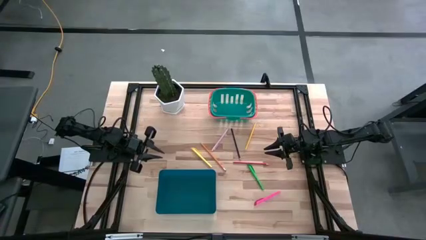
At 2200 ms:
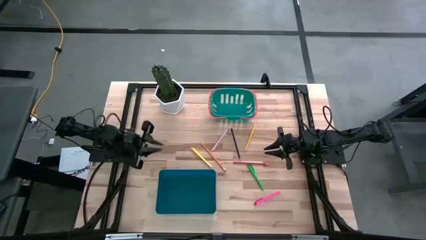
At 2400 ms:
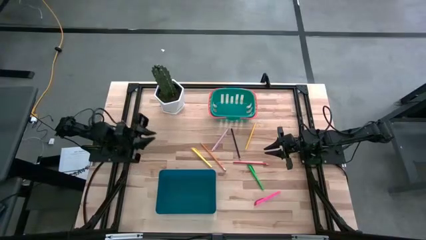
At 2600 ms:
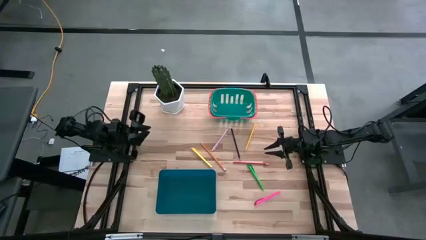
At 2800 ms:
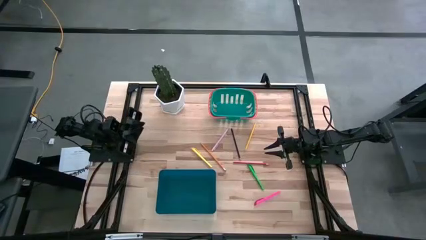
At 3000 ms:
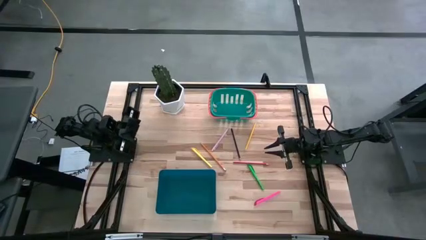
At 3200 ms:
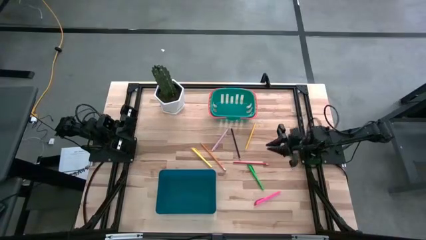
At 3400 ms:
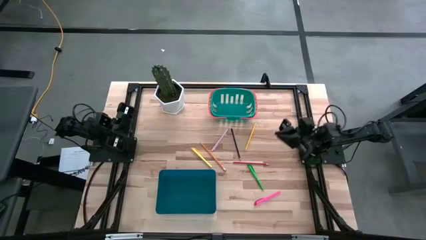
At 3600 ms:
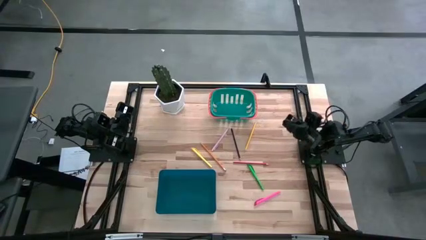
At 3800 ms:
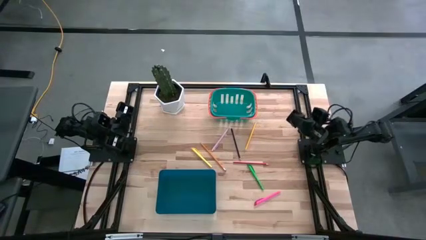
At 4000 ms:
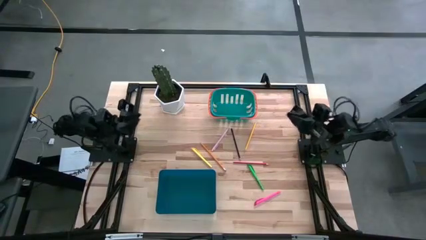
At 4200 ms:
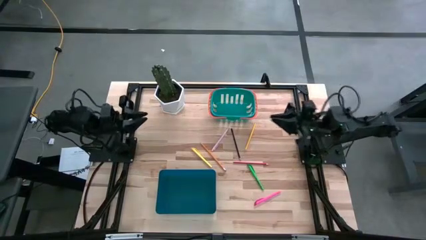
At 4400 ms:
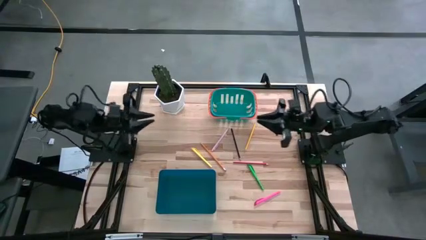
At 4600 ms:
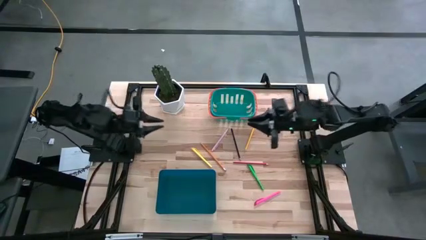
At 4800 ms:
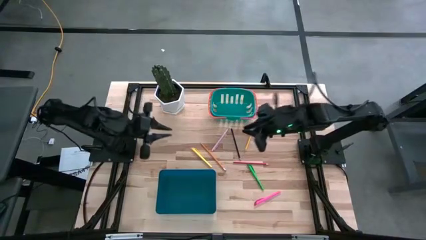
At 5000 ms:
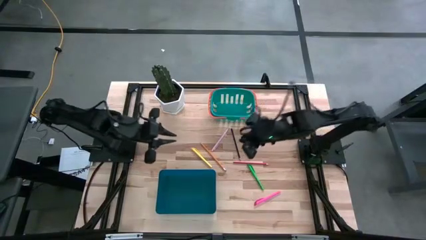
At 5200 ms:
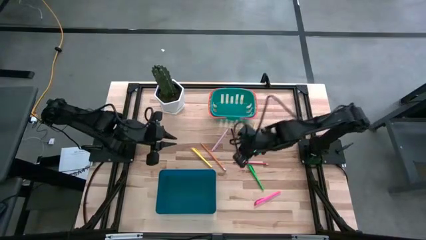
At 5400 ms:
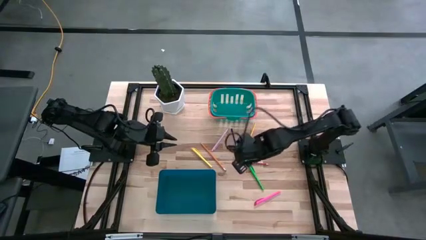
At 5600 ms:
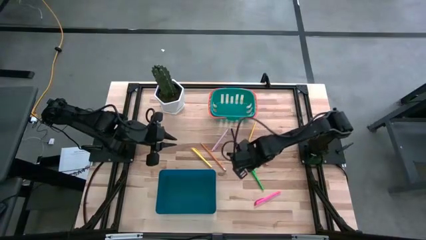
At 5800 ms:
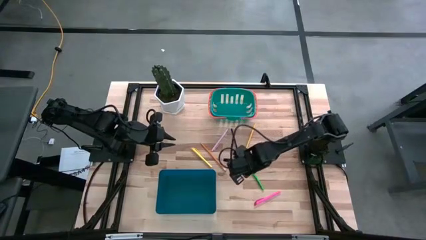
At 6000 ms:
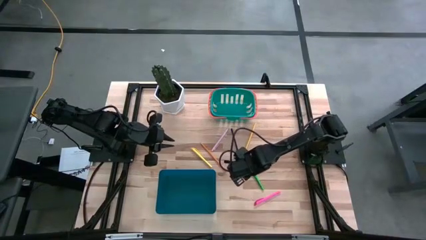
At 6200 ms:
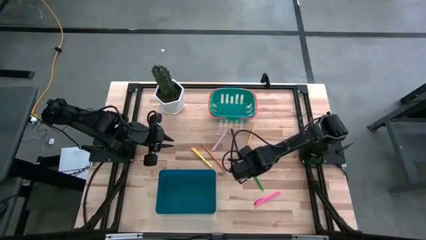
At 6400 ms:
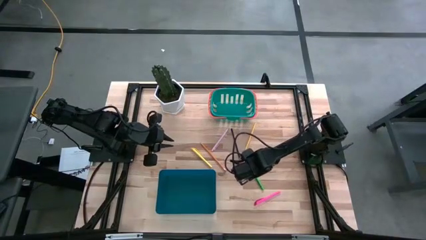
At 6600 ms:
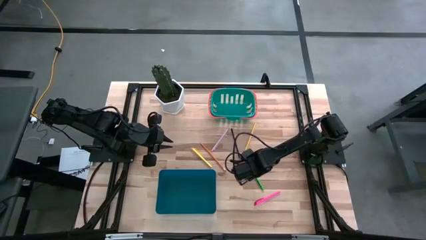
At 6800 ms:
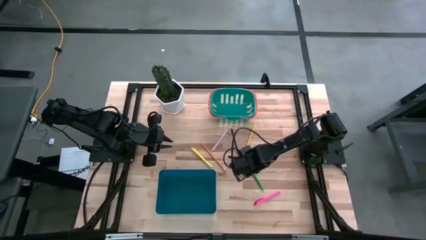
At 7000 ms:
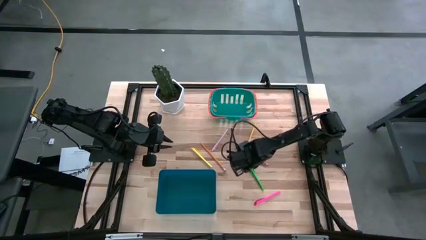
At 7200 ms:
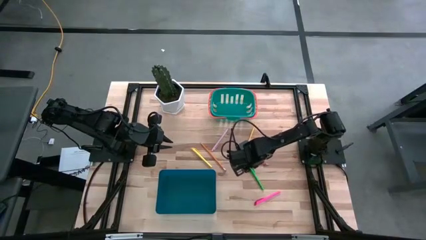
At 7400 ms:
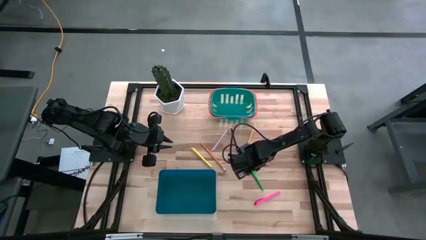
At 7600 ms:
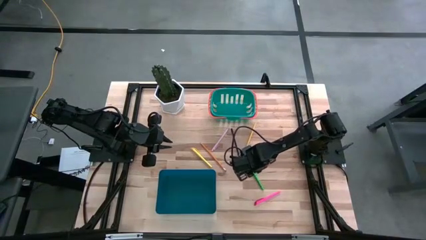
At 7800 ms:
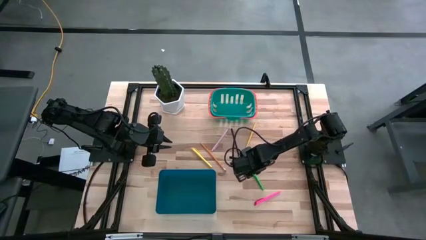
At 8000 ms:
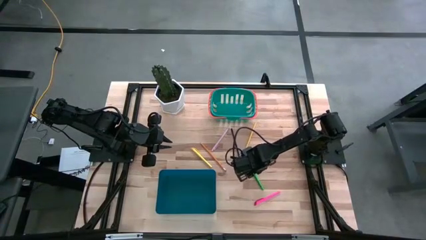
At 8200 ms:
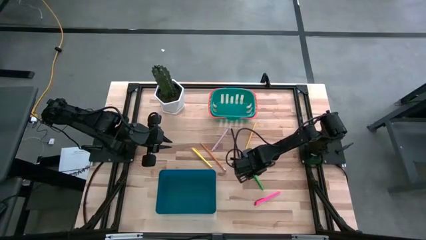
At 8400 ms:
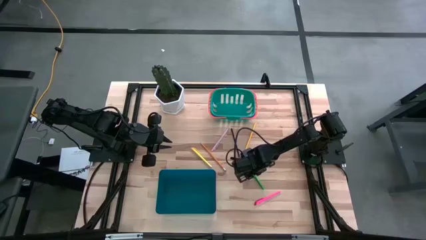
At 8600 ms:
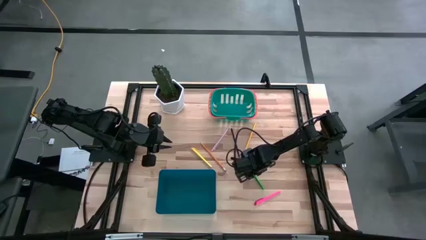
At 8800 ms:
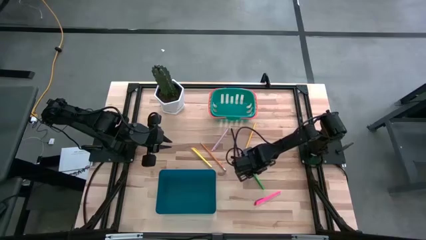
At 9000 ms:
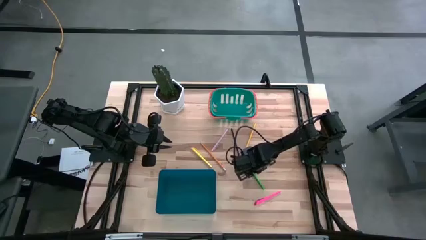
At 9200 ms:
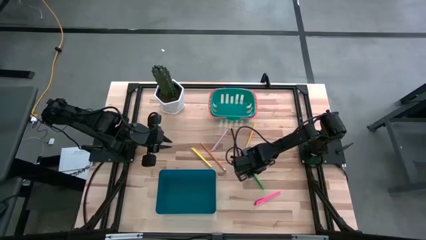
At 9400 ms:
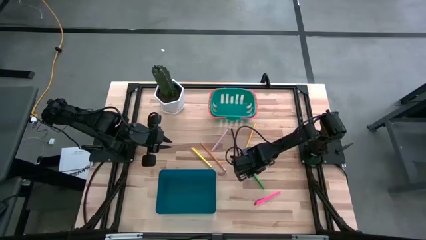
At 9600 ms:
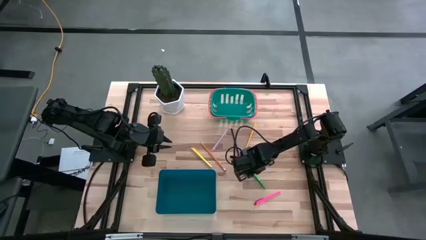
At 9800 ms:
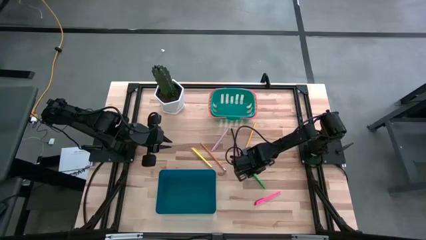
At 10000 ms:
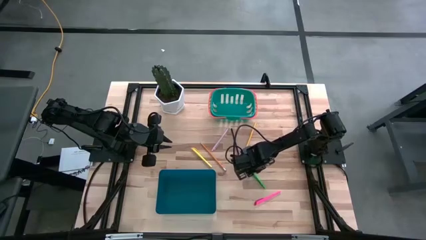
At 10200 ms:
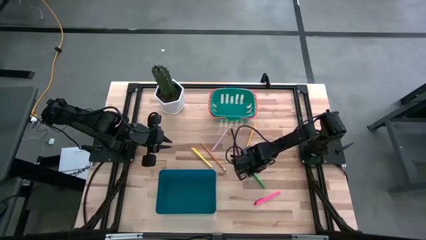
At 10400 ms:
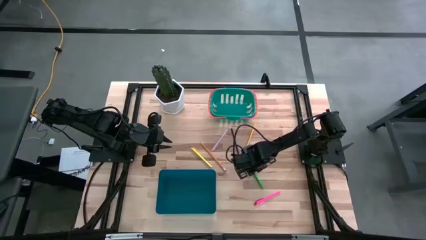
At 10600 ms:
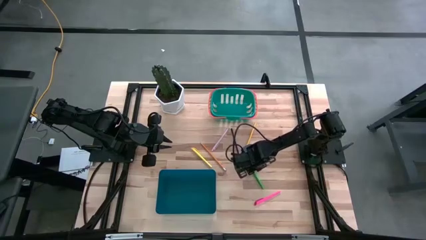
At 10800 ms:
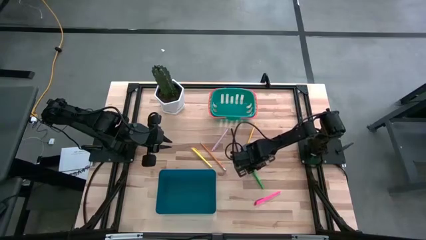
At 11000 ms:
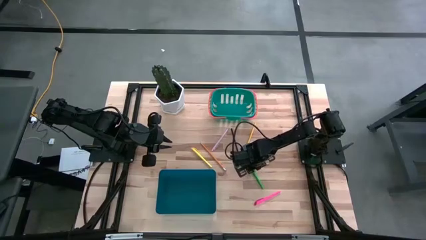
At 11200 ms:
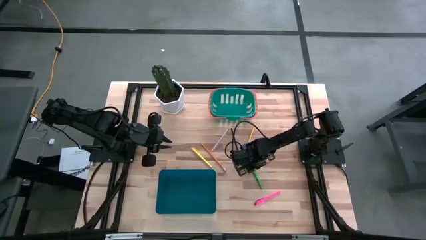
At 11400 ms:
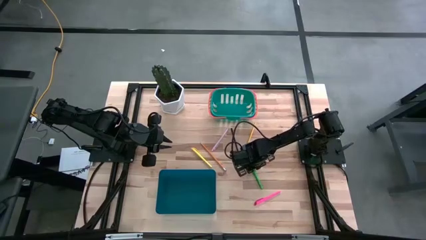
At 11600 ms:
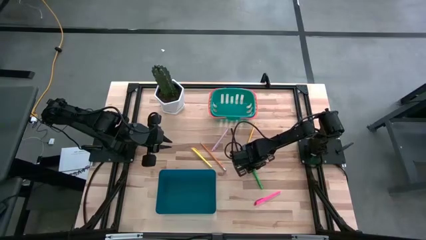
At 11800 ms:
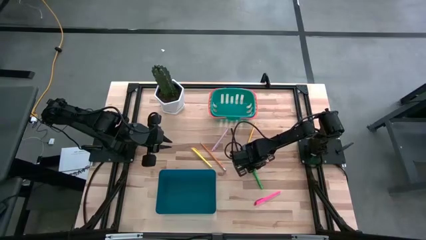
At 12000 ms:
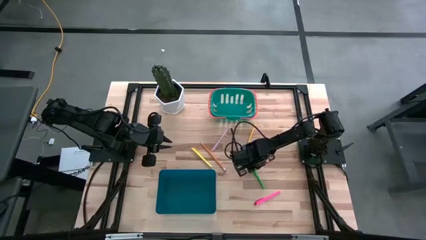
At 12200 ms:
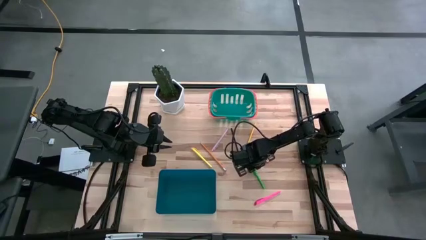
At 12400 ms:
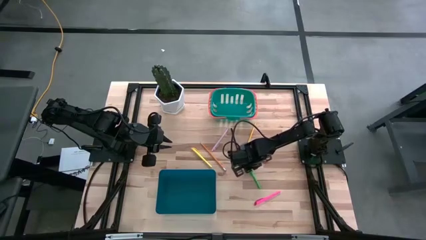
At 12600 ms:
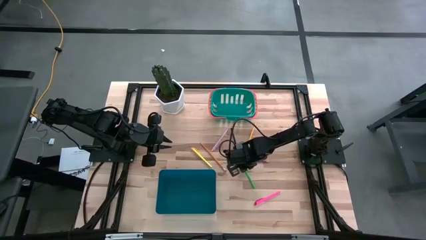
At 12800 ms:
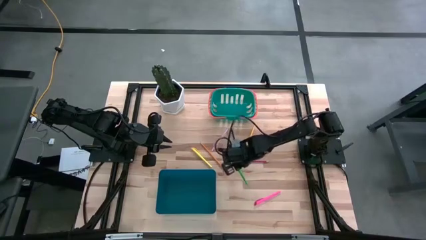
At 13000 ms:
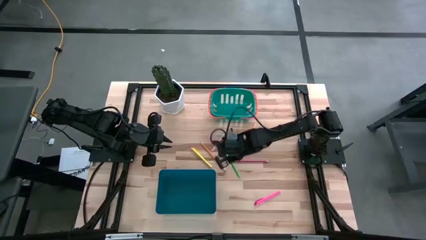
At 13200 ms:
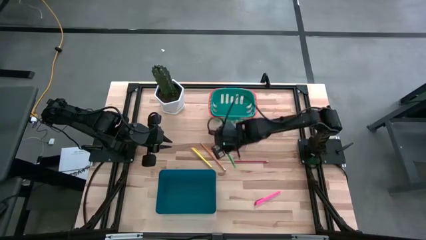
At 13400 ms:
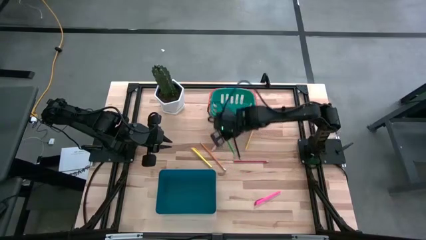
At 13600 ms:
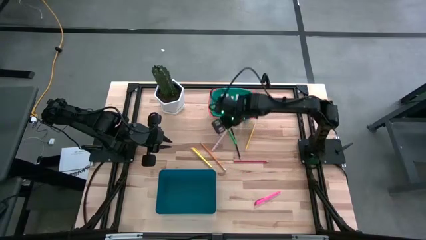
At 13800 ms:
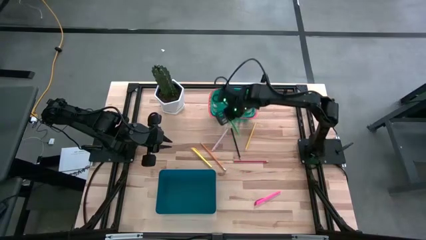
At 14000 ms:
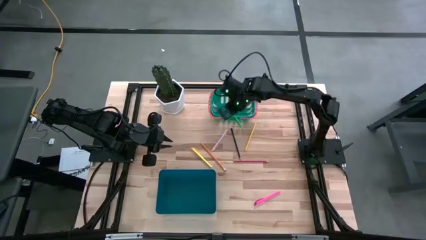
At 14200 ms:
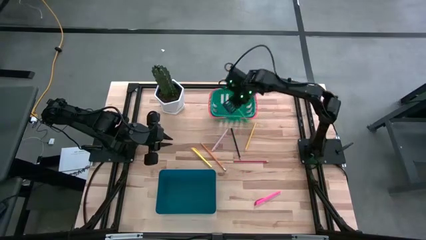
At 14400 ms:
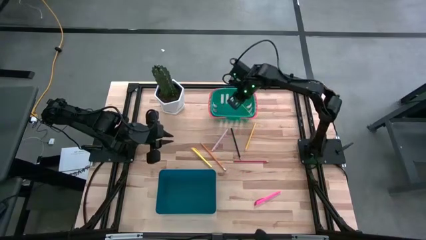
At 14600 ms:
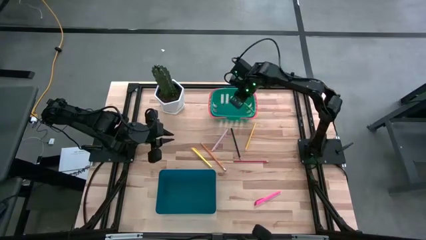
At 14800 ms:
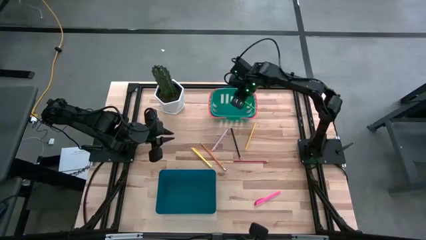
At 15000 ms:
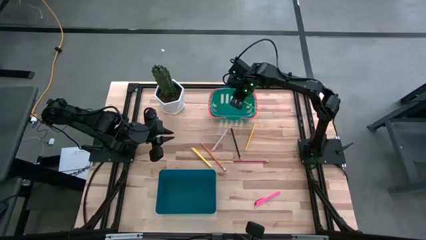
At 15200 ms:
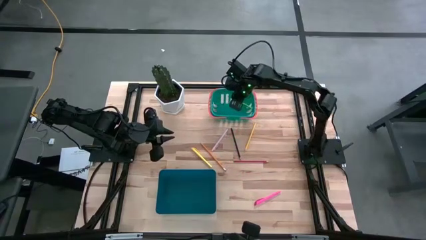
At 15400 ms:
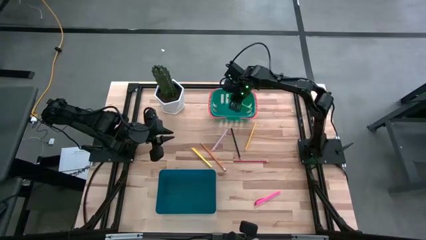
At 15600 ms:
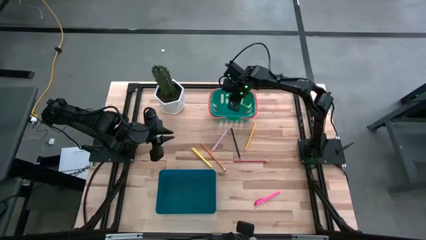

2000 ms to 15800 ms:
Task: Sort pens & pencils
Put the green pen into the green basket
